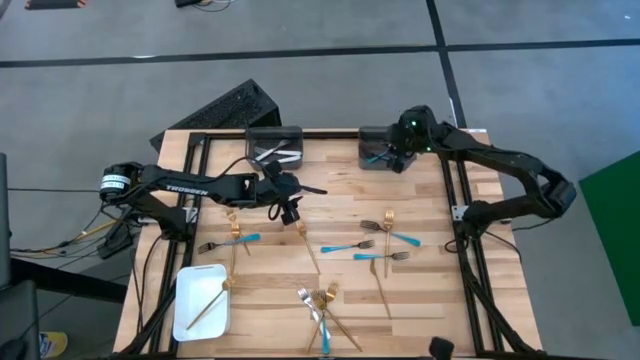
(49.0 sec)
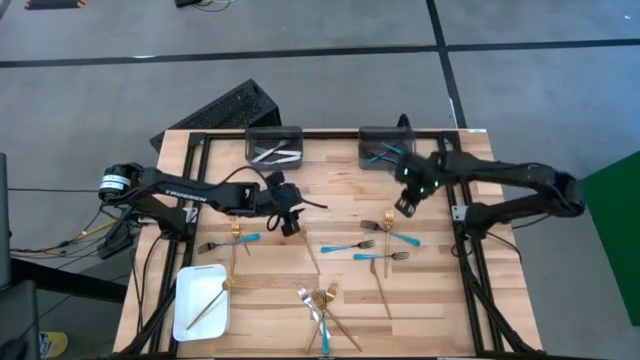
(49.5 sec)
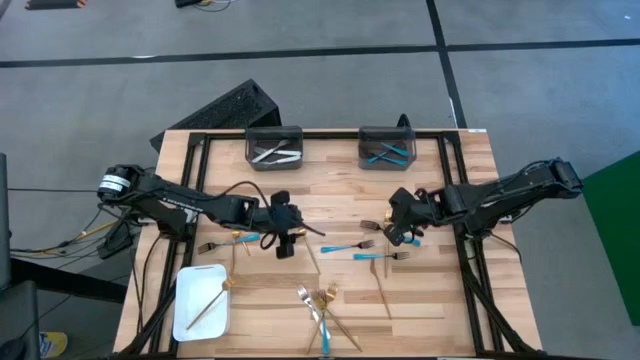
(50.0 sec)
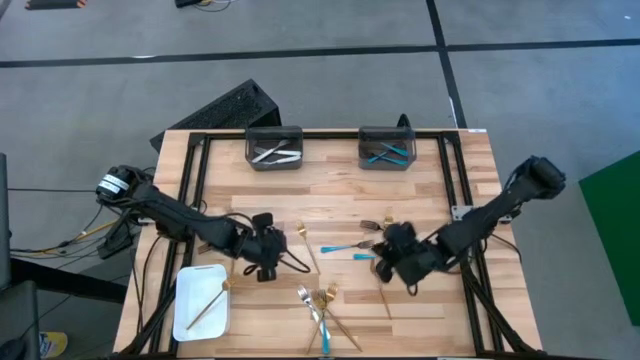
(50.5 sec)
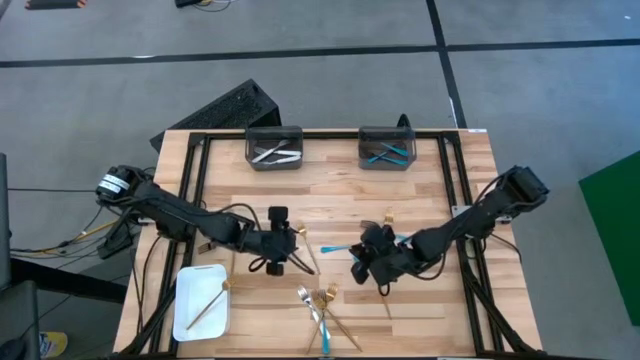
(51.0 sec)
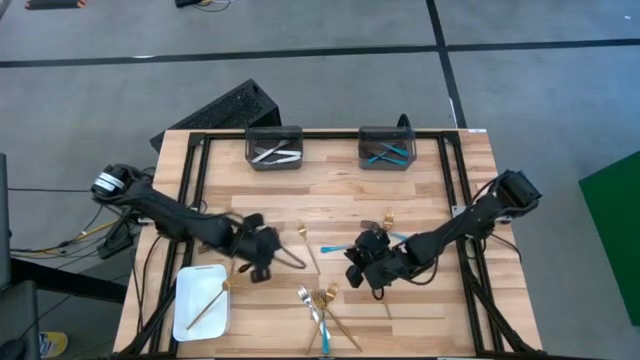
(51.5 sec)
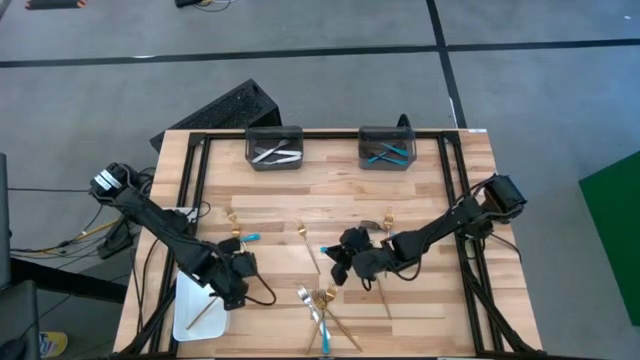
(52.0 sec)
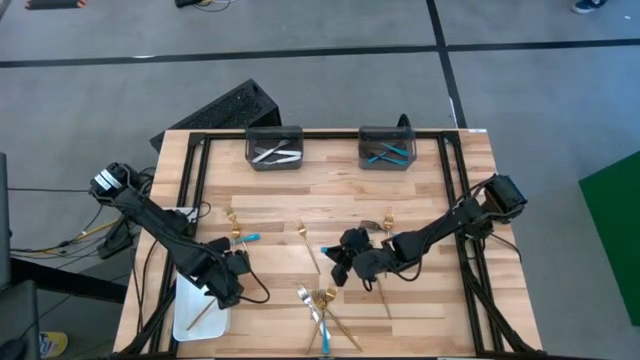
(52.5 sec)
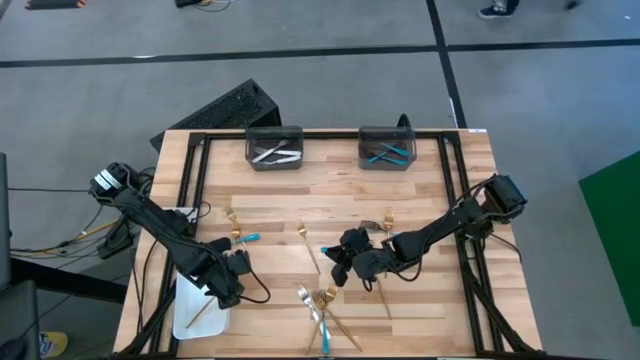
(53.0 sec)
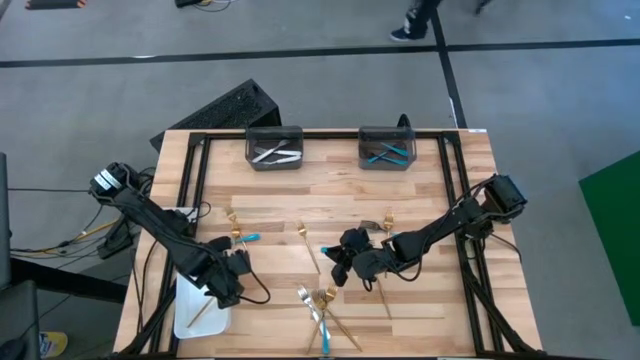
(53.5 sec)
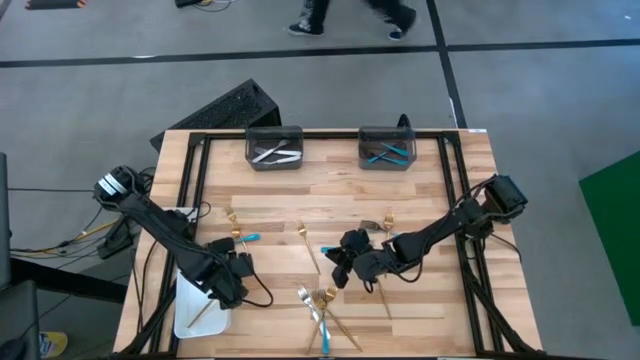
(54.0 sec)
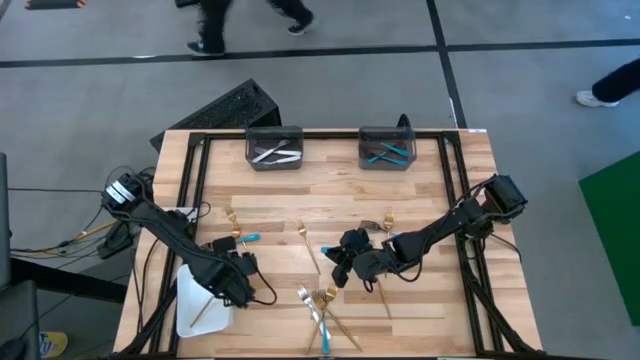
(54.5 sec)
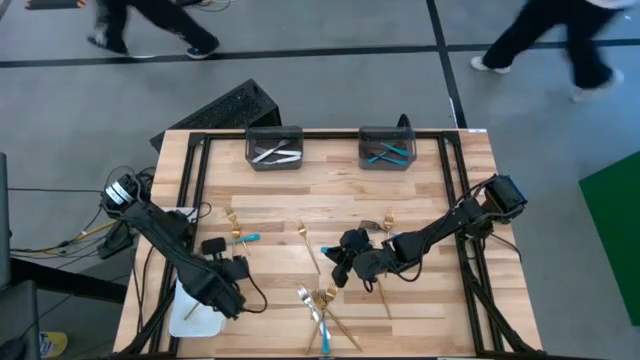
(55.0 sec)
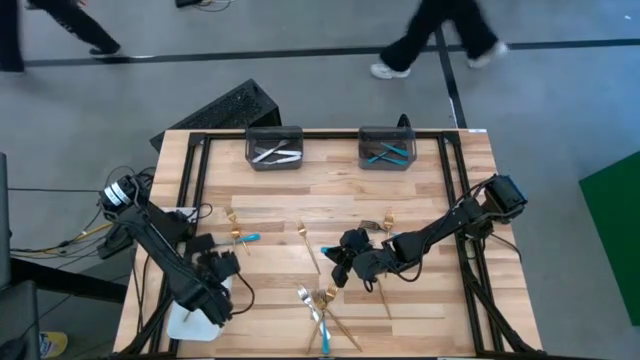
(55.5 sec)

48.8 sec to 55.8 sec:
Task: Sort silverware by color (type)
Adjust the gold spoon in the white bin

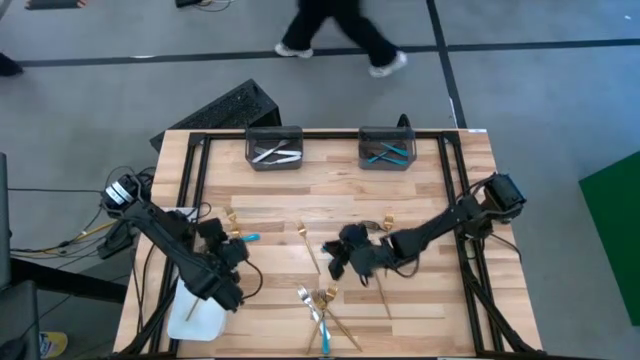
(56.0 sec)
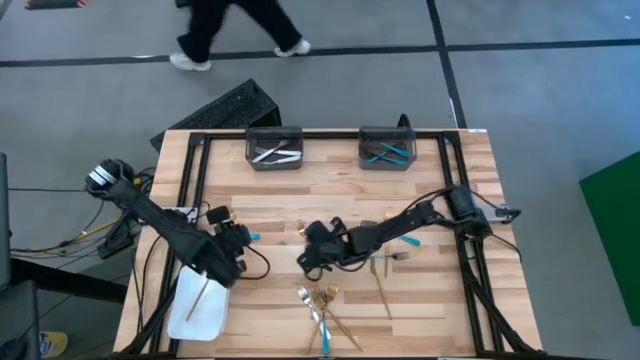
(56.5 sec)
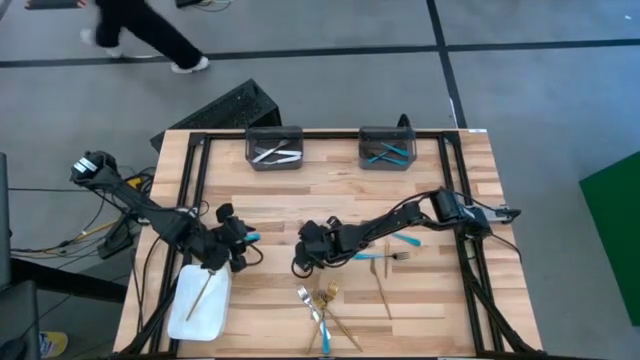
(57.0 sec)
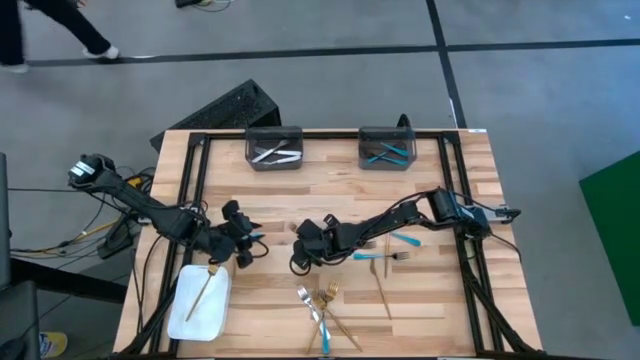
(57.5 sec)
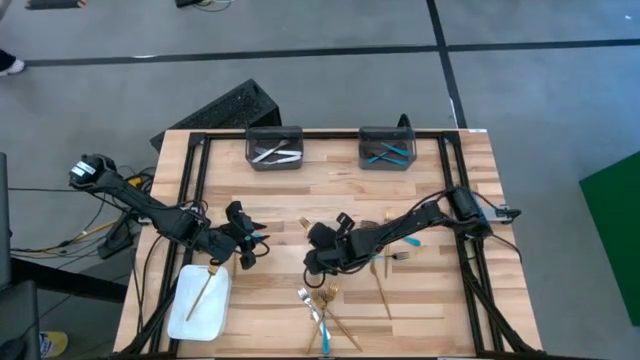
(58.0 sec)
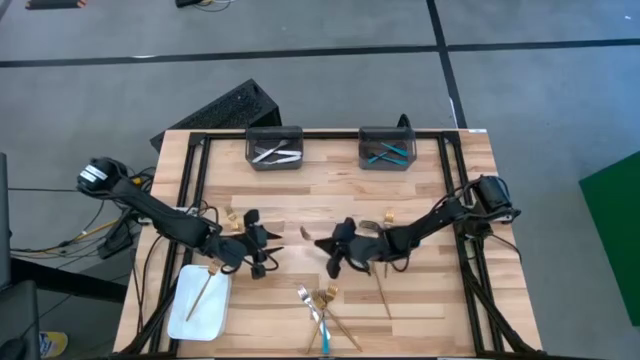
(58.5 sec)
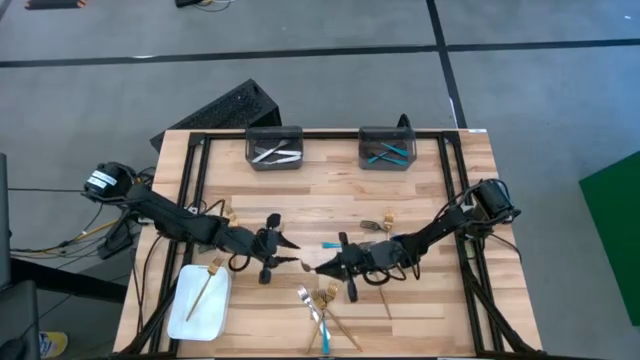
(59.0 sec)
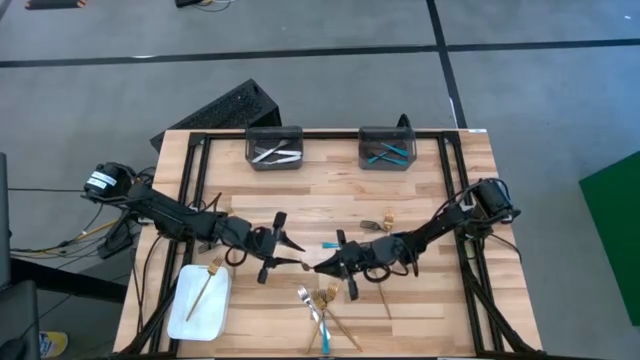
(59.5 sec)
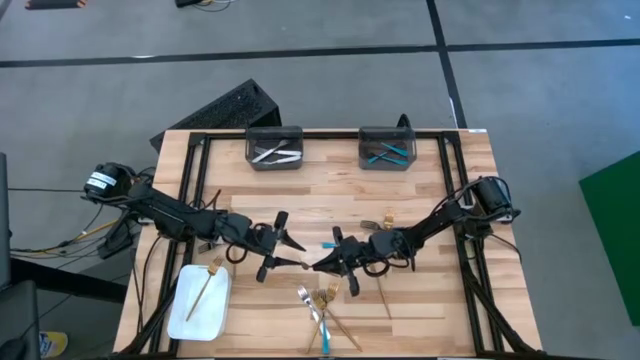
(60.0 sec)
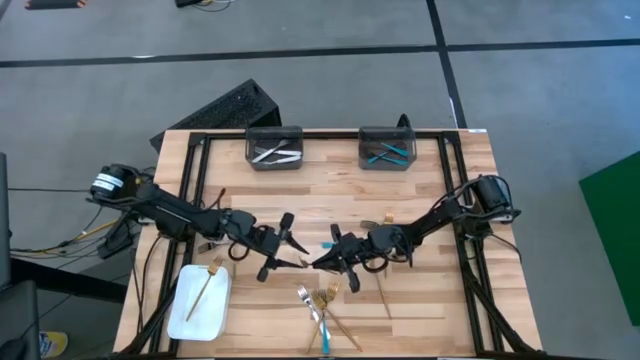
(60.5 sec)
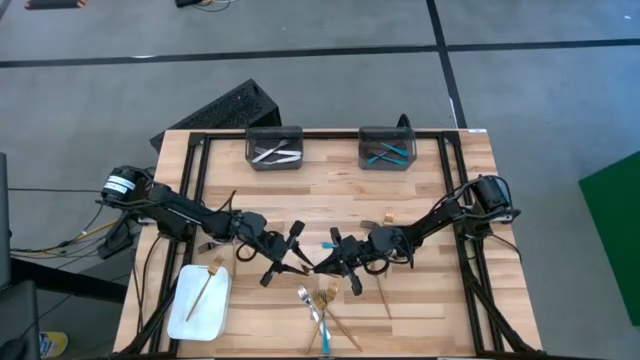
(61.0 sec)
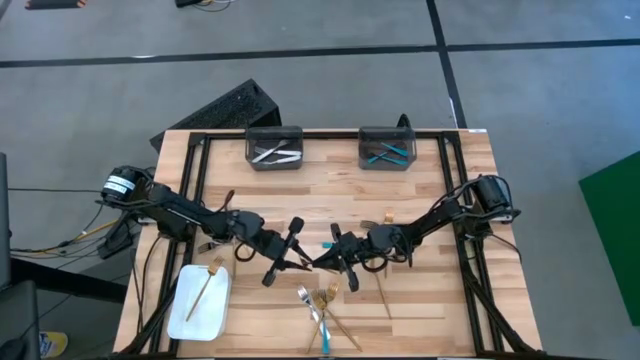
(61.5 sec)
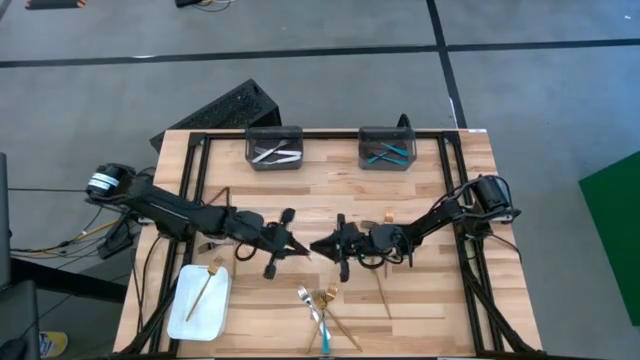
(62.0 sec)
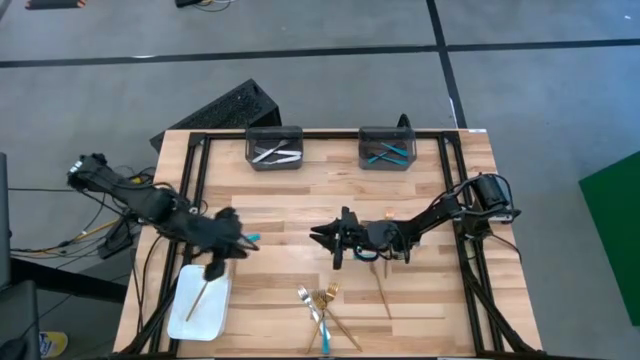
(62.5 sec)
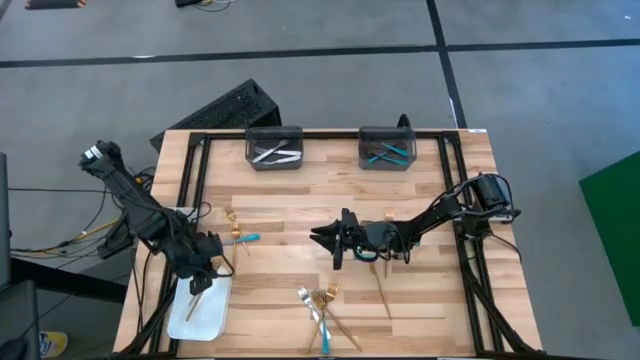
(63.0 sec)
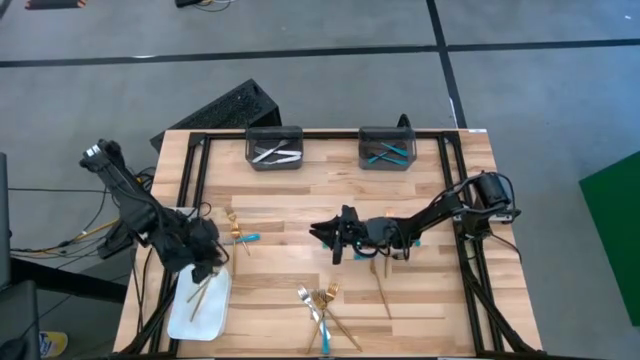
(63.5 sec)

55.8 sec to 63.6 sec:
Put the gold spoon on the white bin

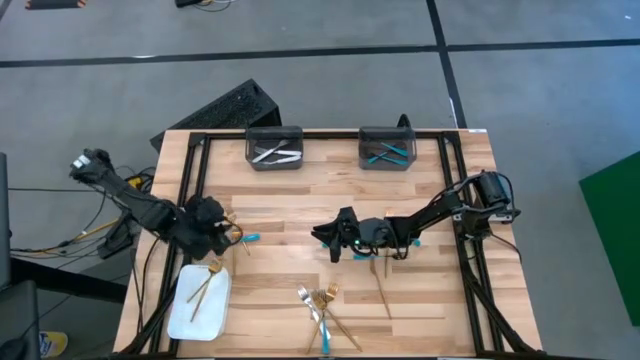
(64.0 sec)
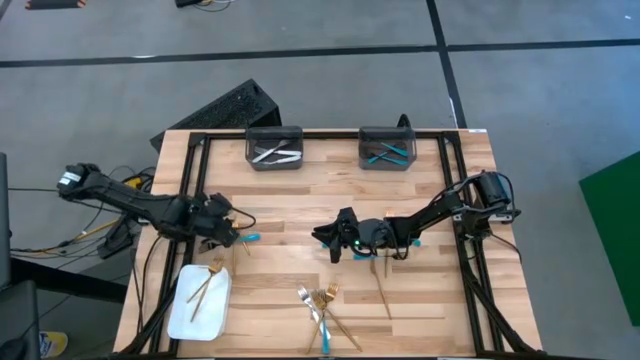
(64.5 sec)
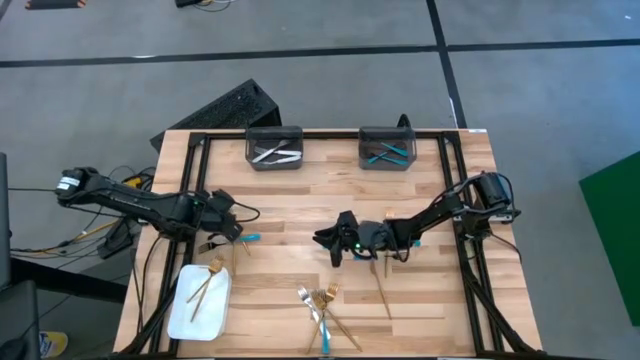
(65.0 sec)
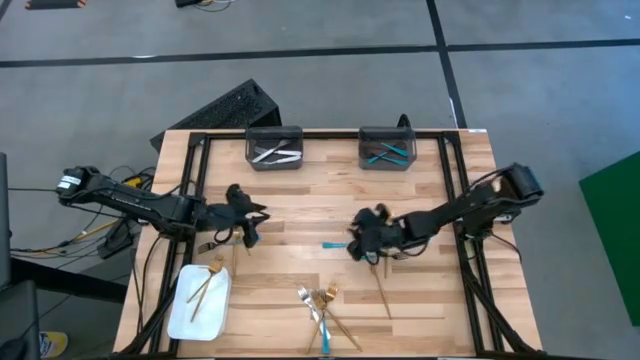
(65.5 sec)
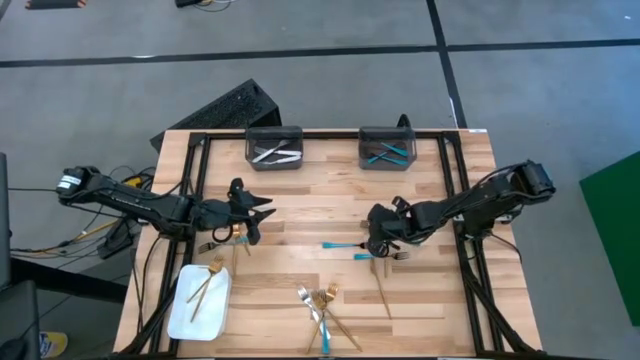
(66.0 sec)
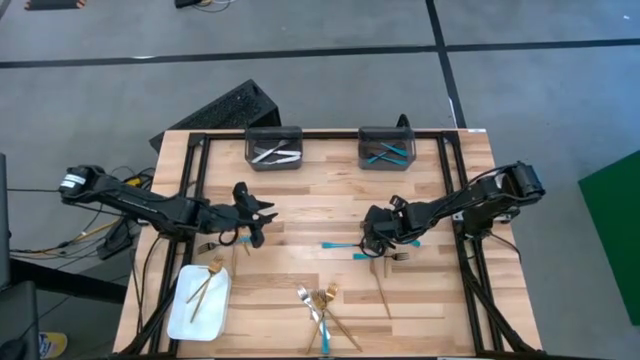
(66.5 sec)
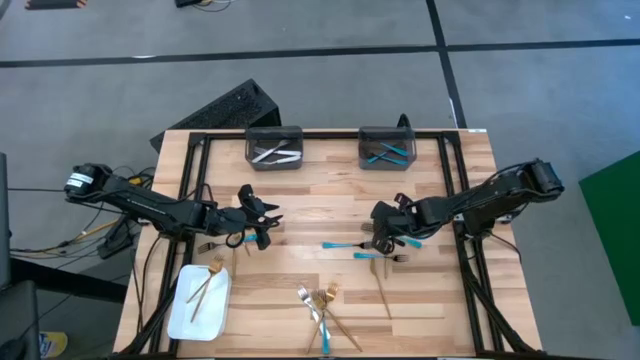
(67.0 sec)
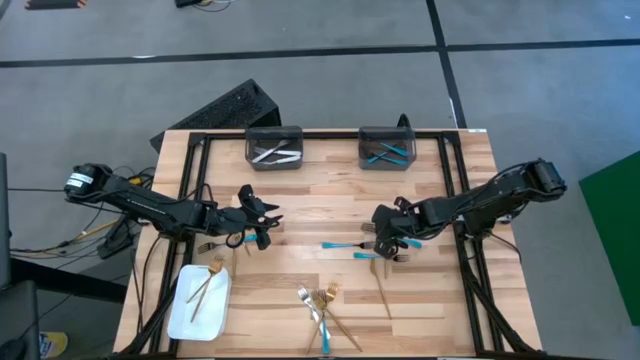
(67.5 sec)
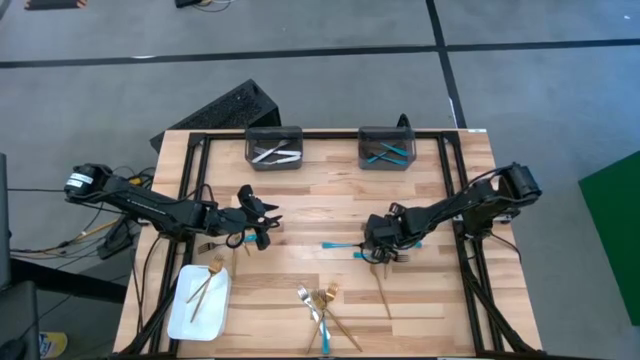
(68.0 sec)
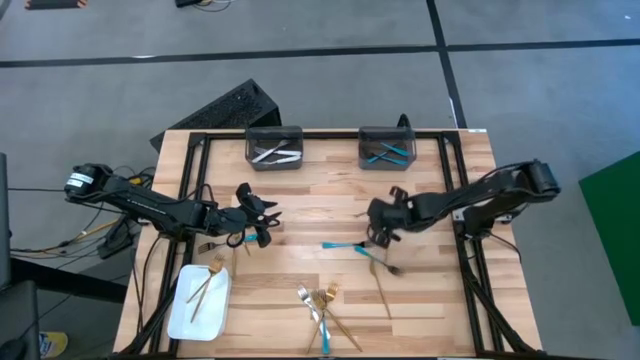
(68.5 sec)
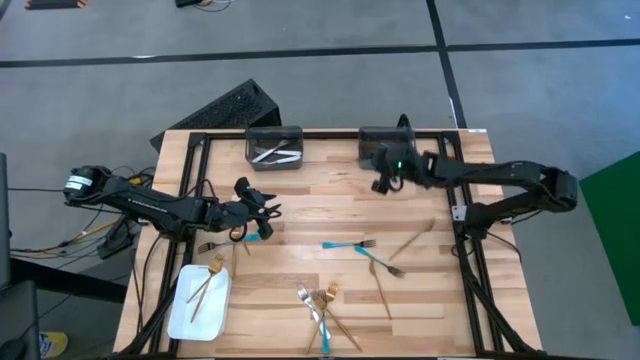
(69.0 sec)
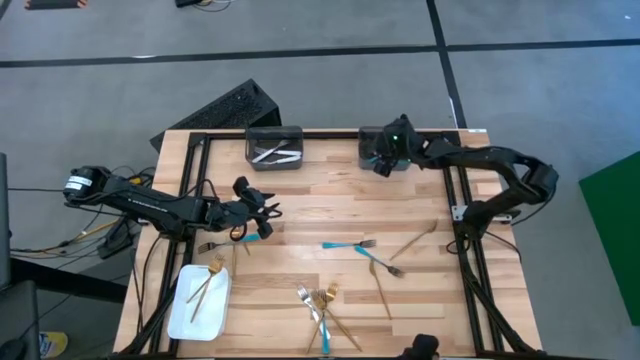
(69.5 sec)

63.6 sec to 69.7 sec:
Put the blue fork into the right black bin
